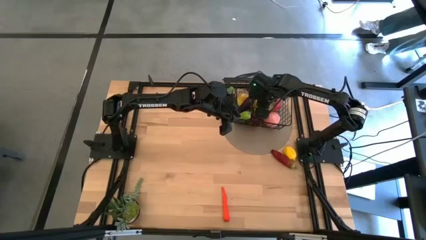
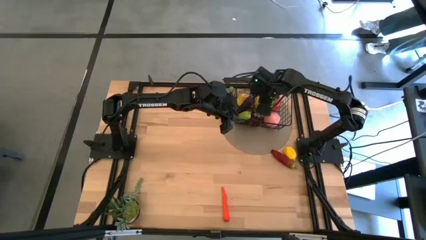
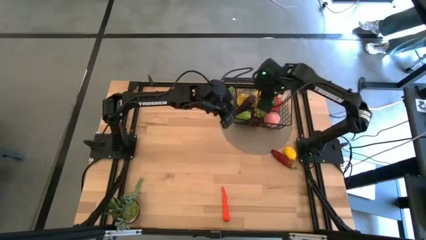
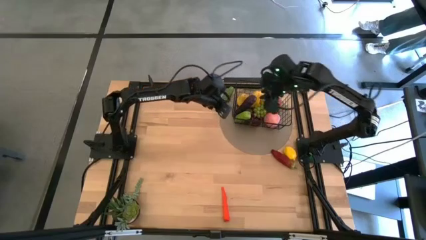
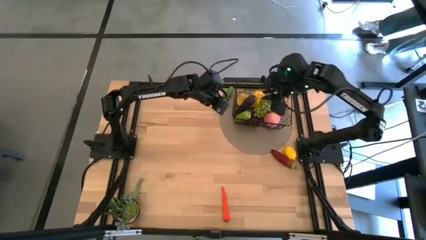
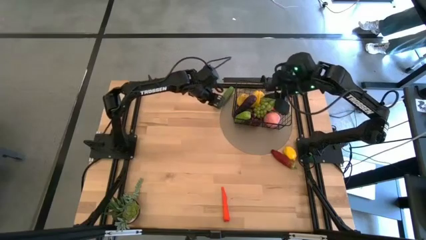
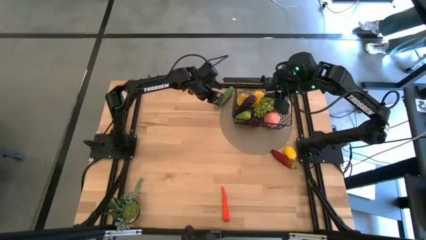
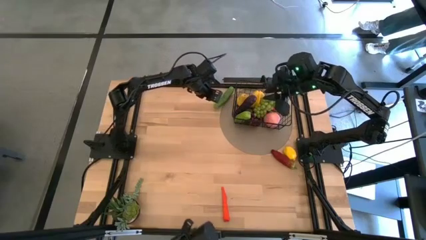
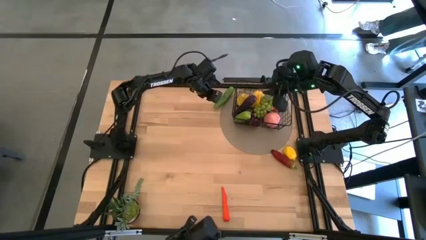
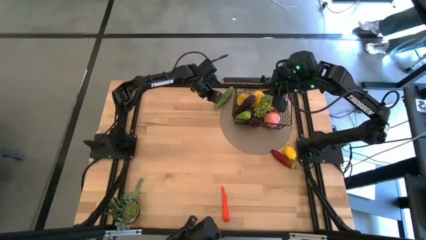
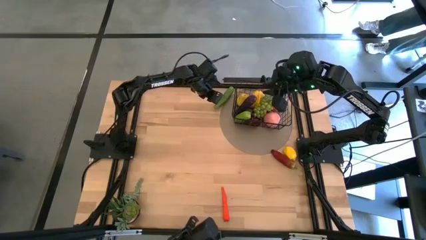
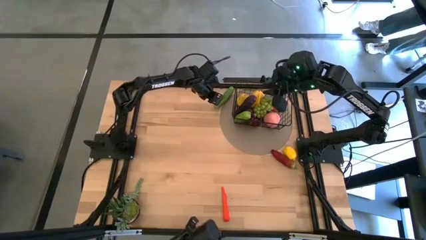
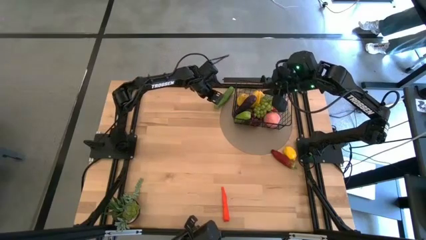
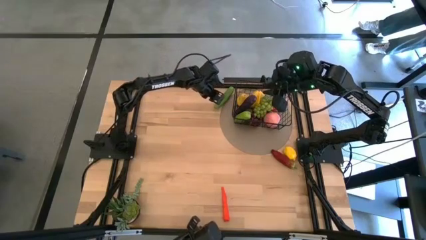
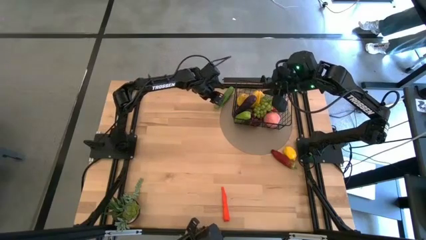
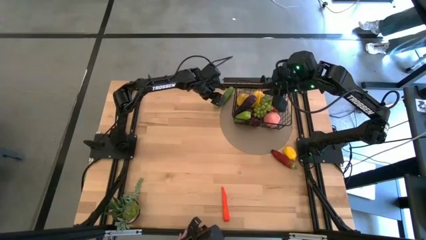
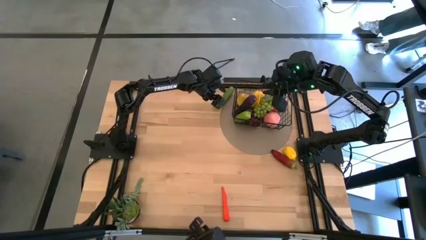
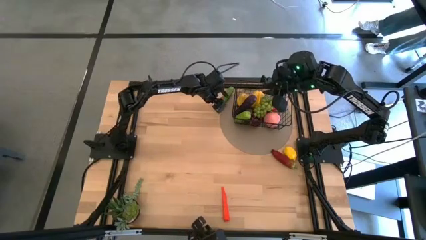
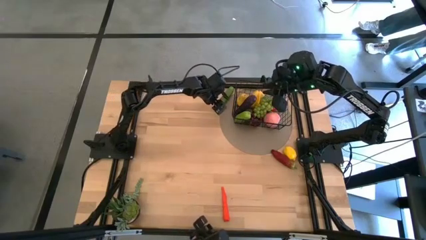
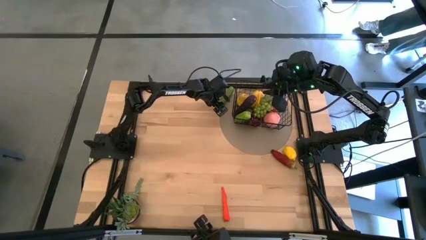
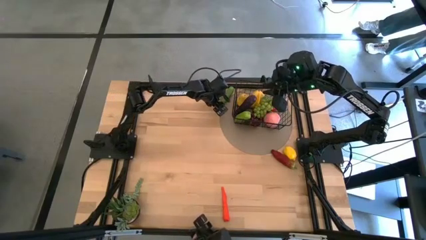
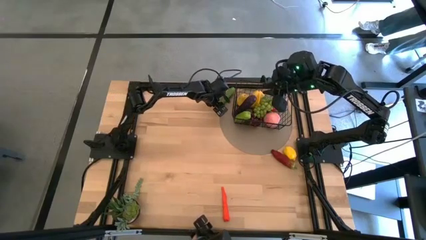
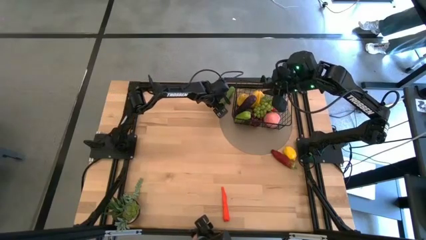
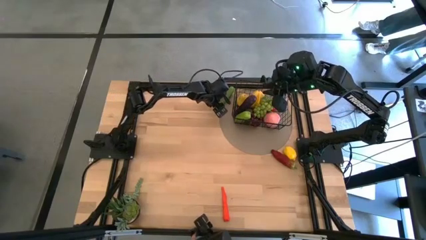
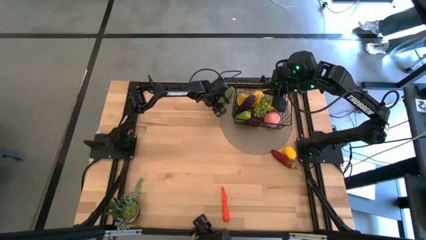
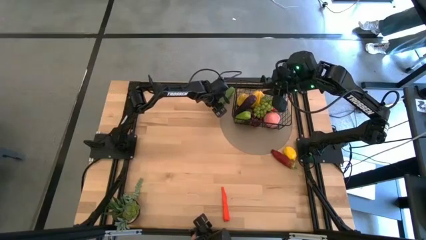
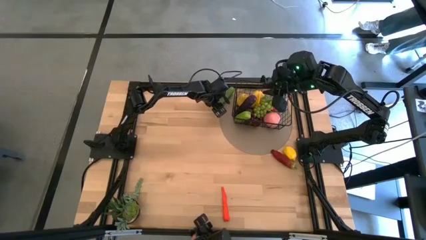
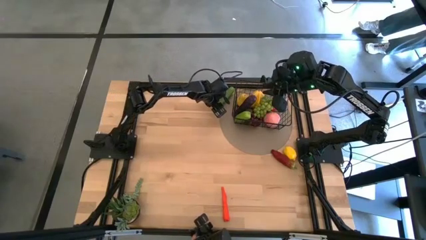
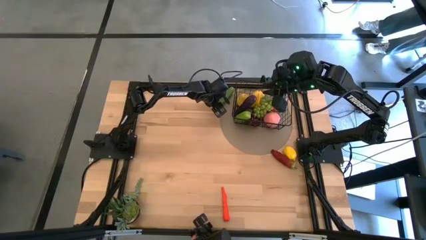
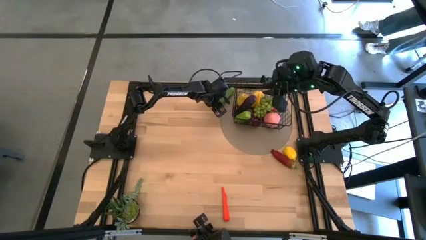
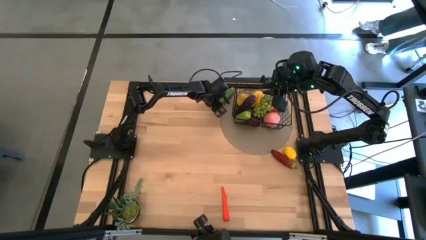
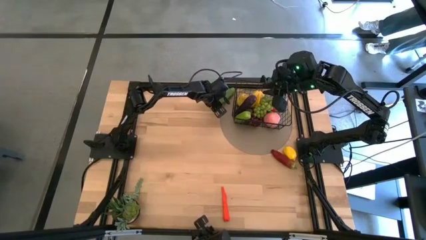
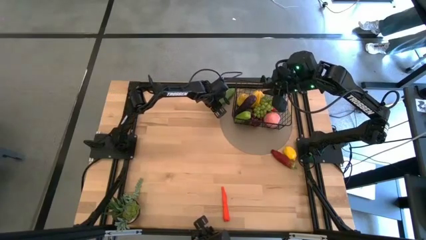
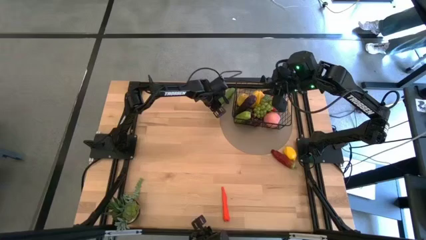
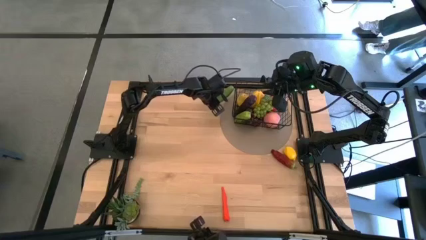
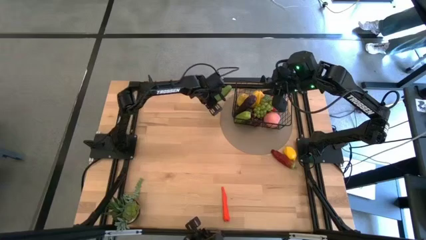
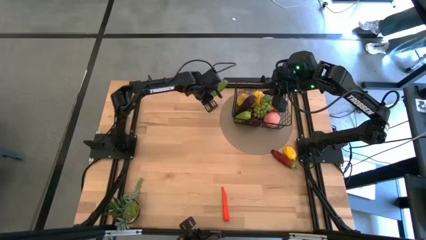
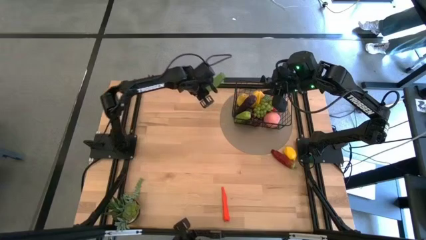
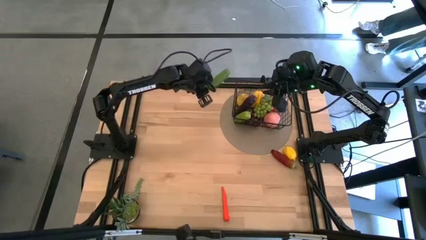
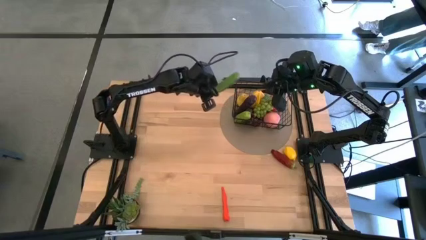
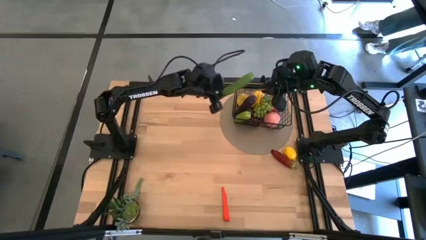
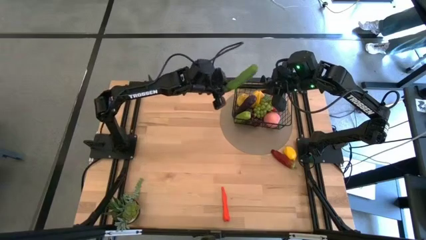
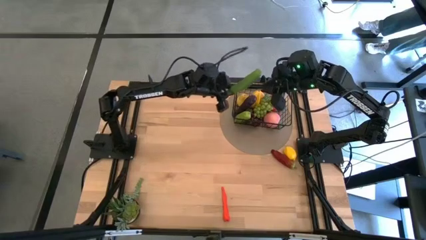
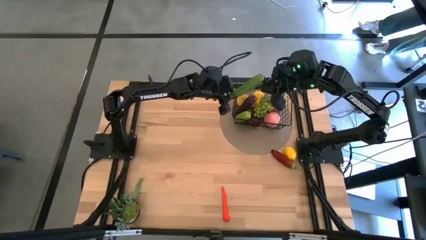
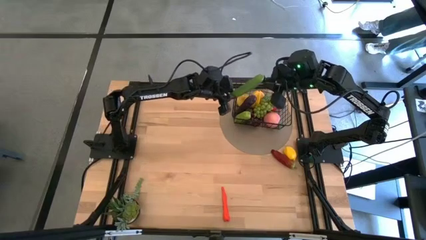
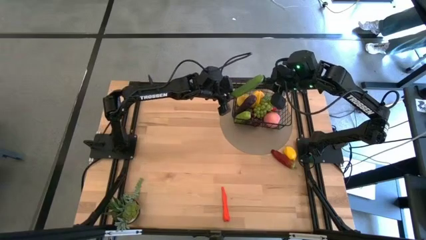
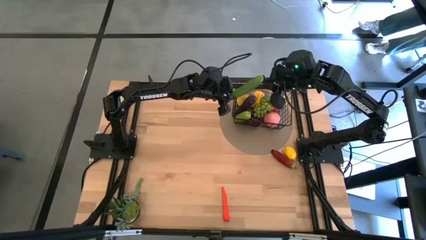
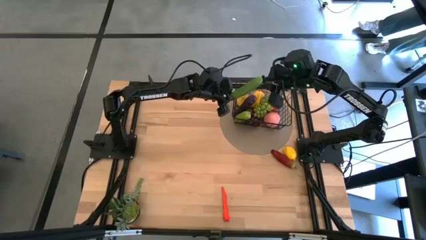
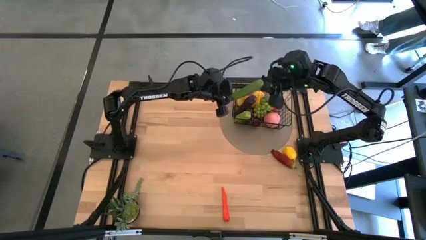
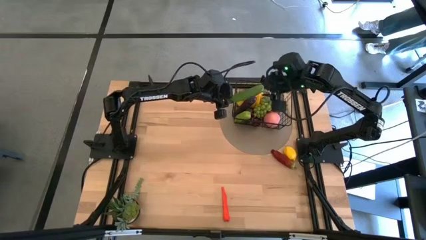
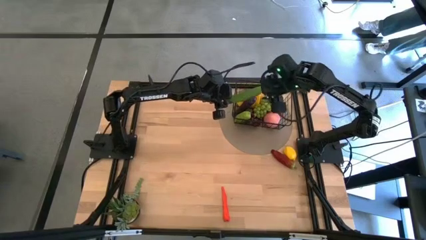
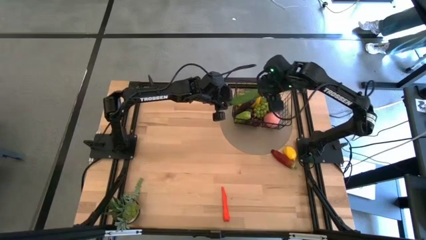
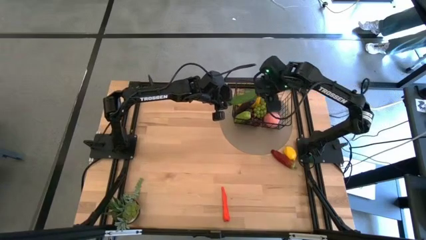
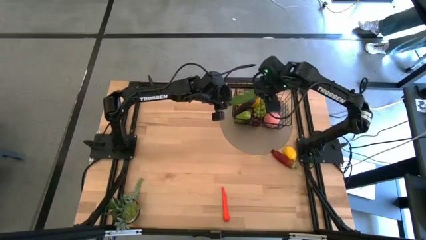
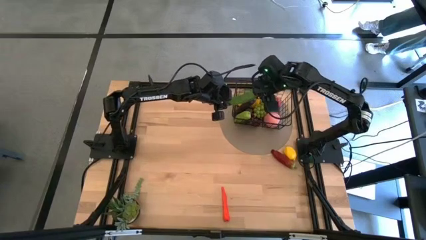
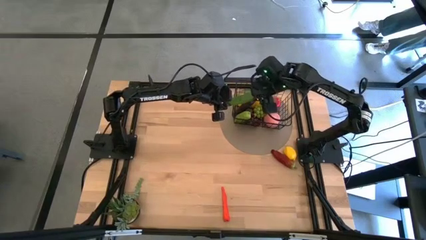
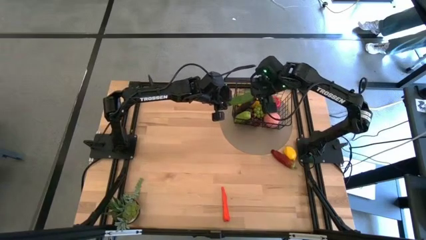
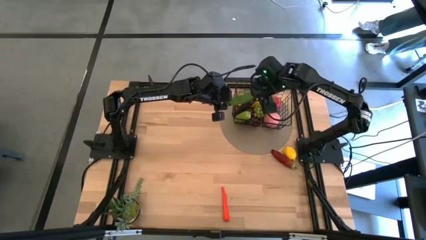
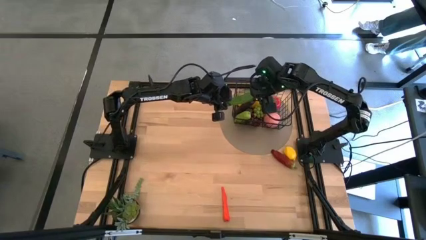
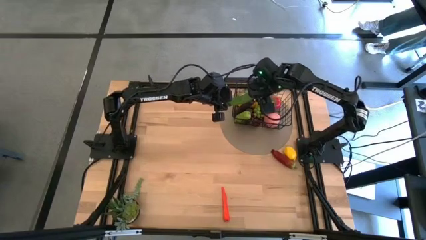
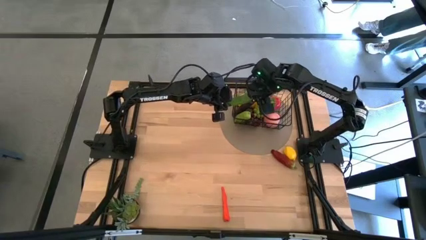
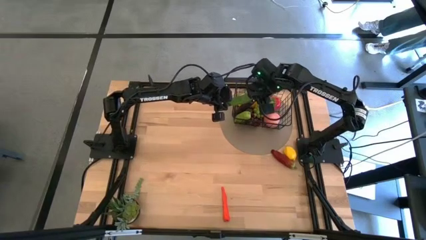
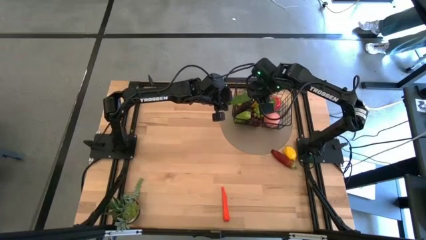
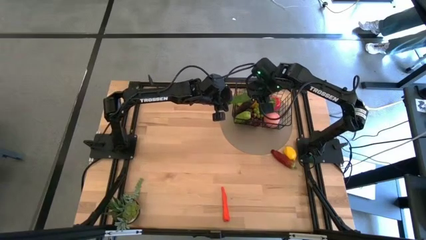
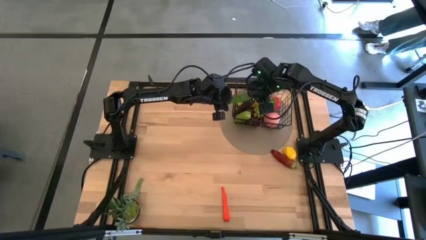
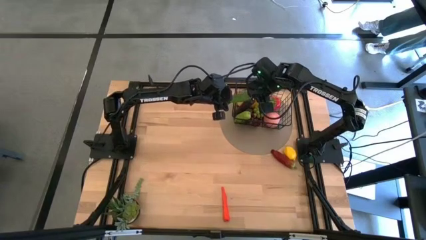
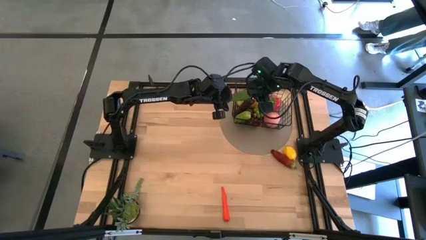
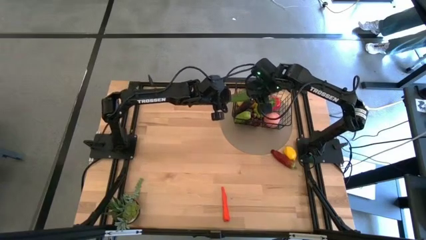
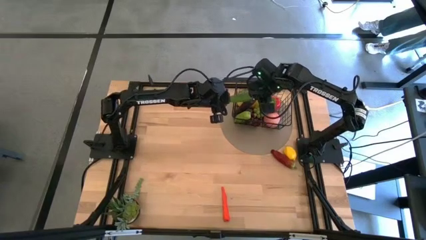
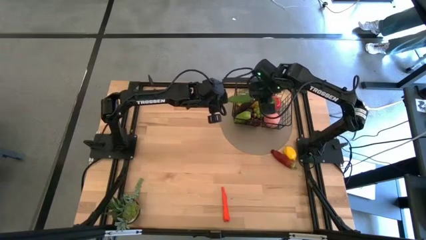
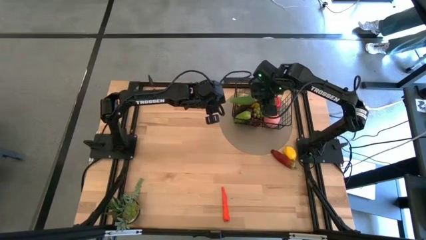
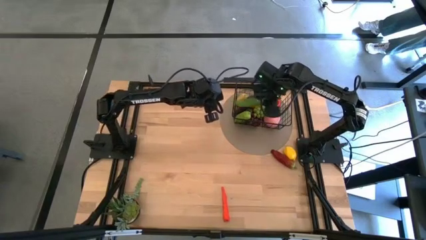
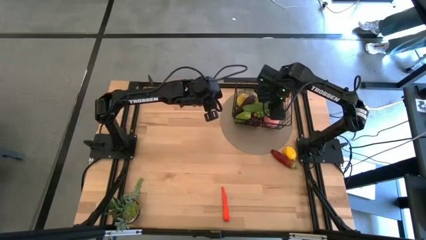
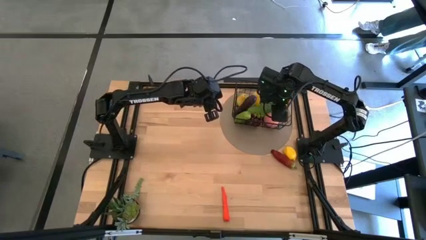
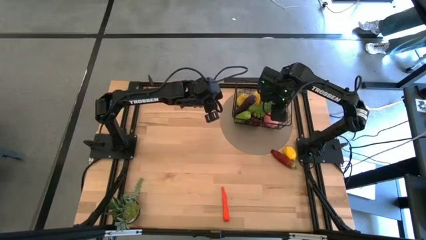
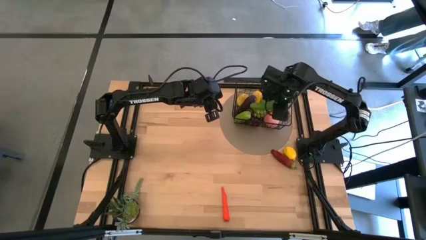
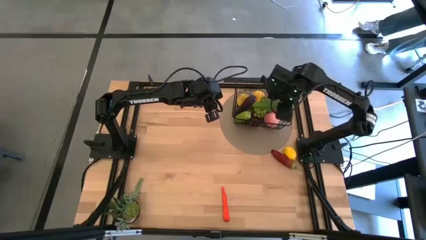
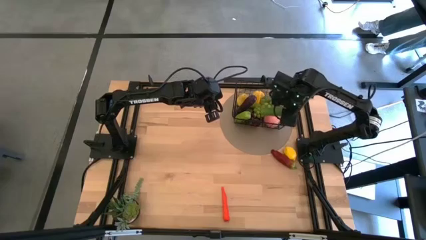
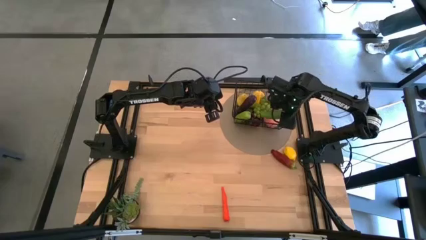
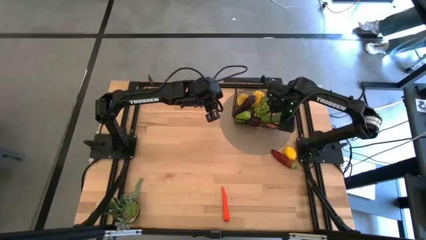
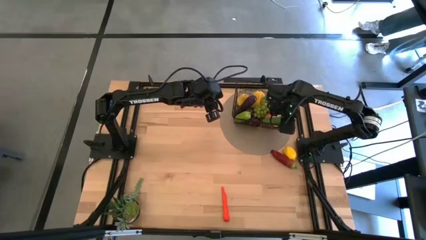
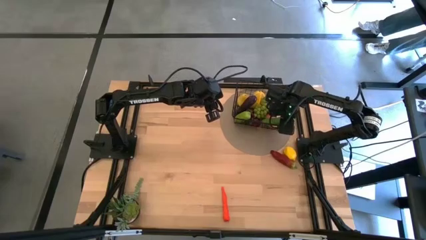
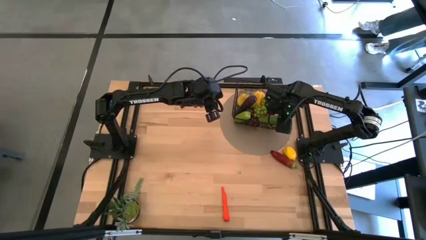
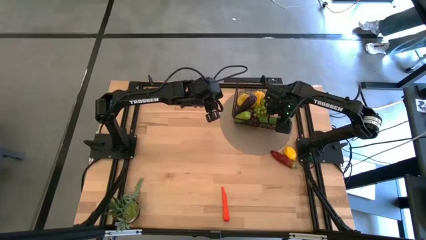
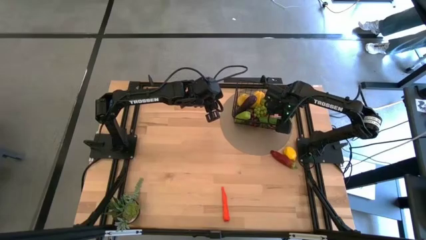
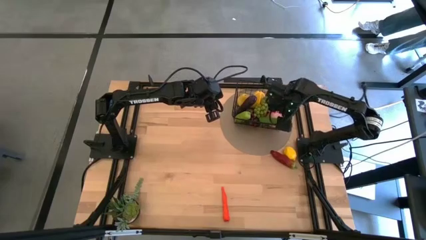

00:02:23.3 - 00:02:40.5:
Task: Build produce basket
Put the green cucumber into the black wire basket

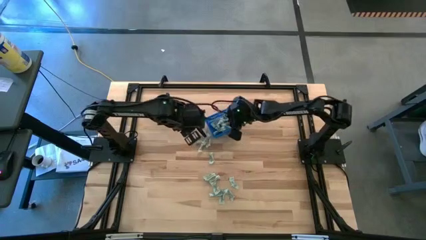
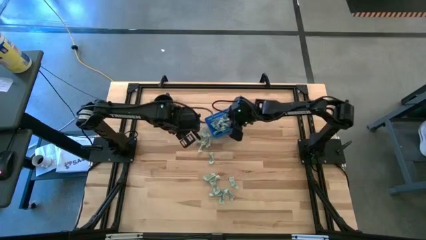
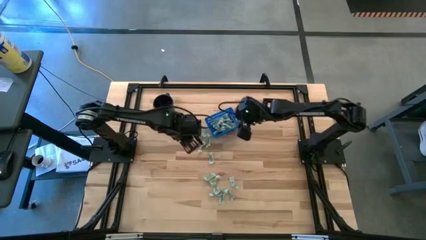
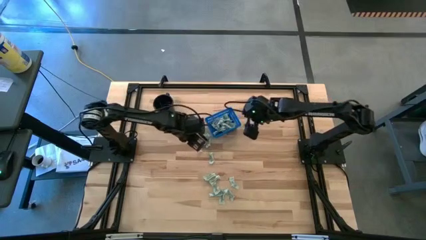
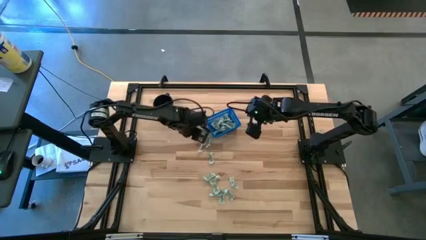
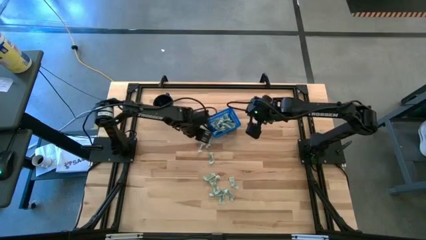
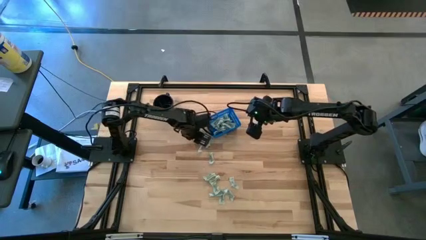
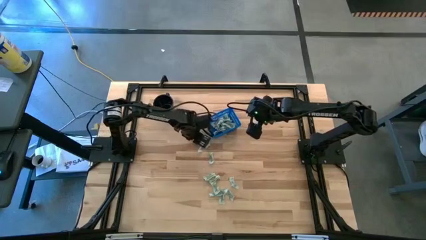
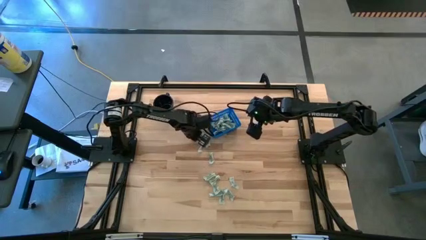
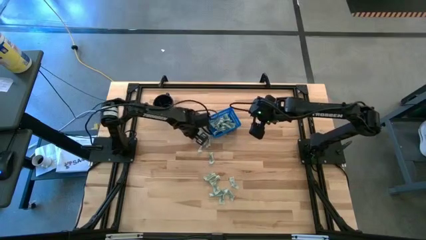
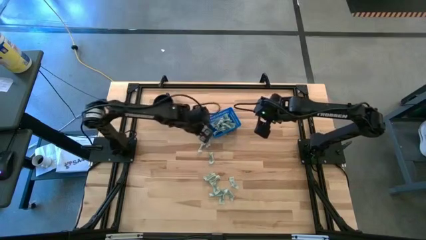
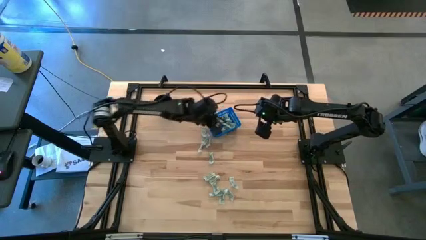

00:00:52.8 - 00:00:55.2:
Task: Pick and place Stevia / Truvia into bins
Put the green stevia packet into the blue bin
